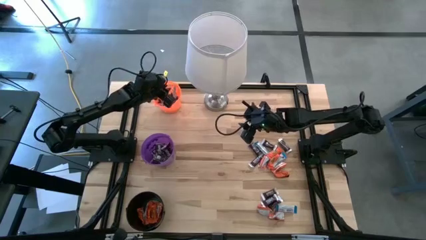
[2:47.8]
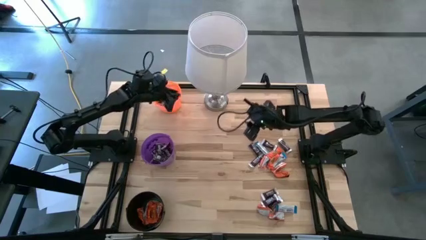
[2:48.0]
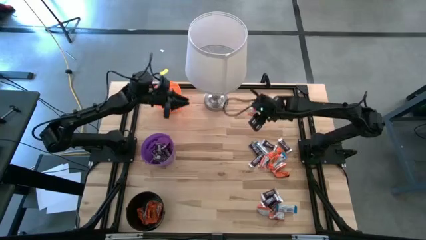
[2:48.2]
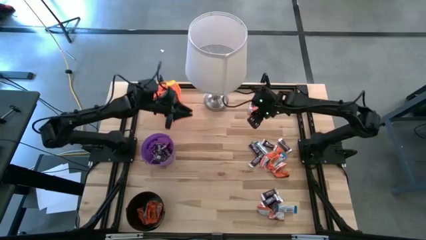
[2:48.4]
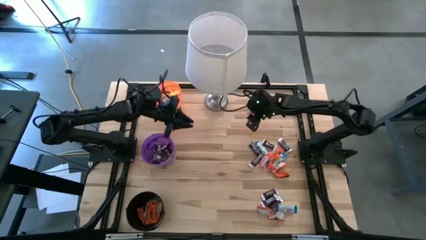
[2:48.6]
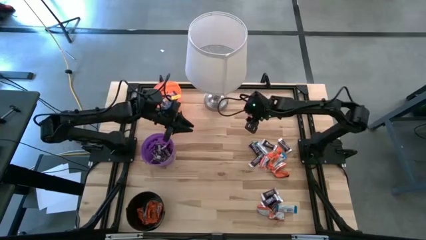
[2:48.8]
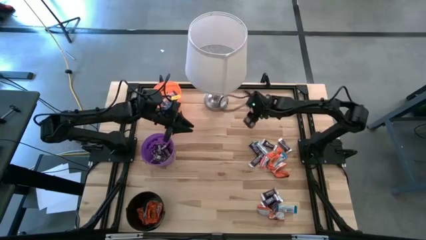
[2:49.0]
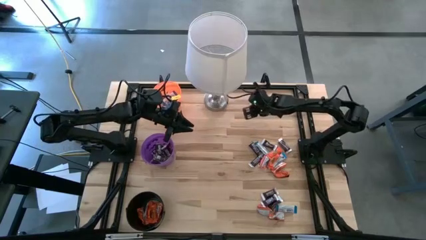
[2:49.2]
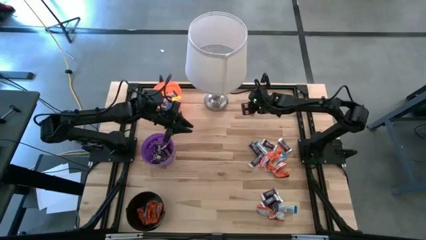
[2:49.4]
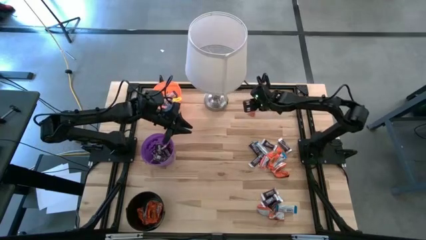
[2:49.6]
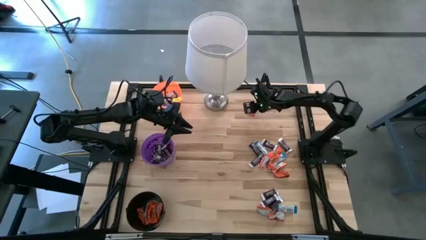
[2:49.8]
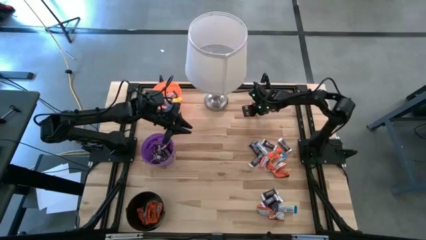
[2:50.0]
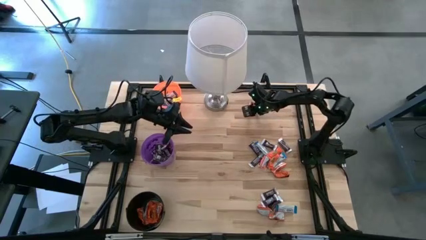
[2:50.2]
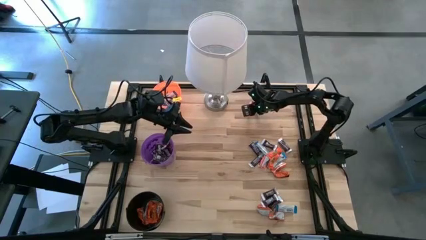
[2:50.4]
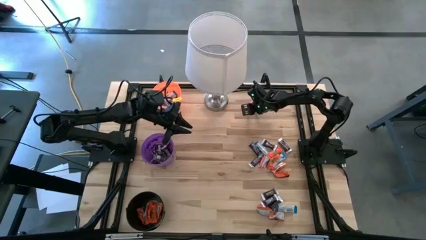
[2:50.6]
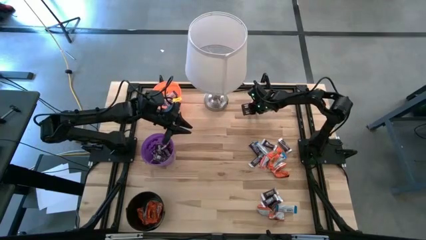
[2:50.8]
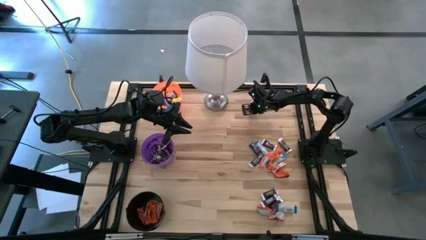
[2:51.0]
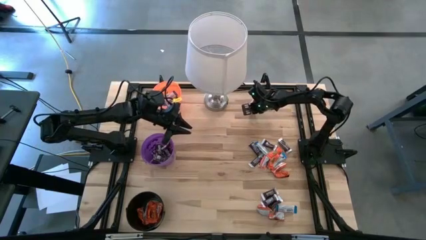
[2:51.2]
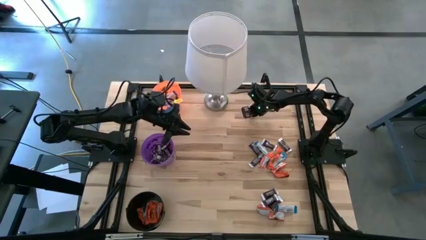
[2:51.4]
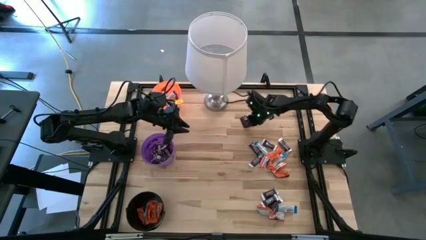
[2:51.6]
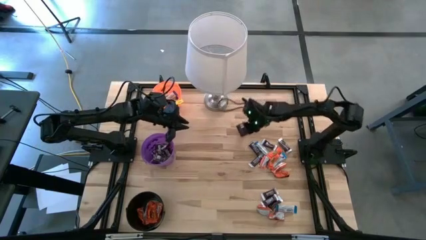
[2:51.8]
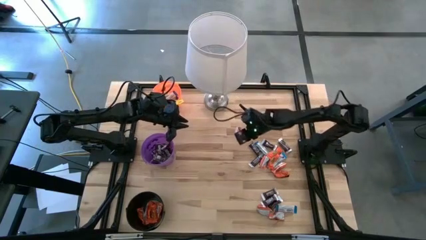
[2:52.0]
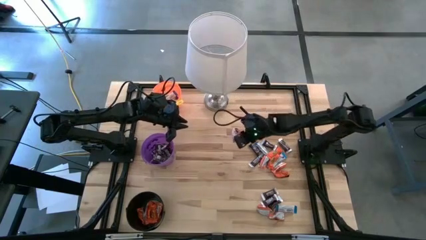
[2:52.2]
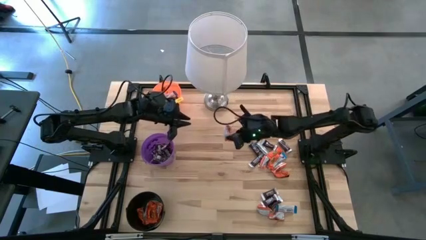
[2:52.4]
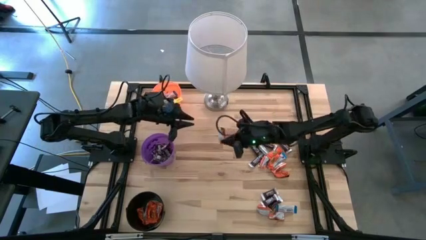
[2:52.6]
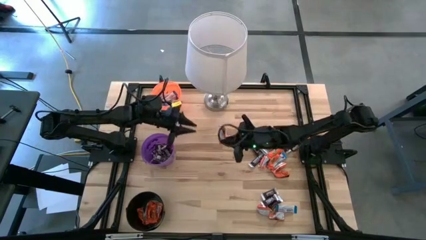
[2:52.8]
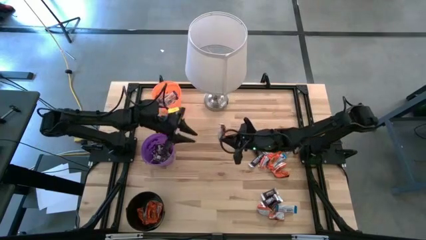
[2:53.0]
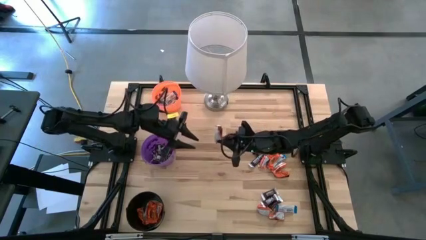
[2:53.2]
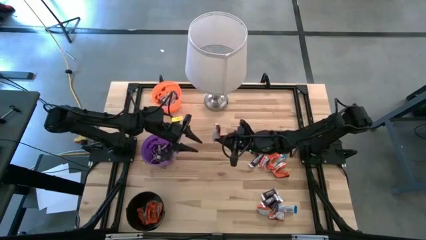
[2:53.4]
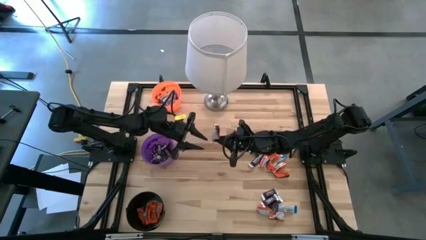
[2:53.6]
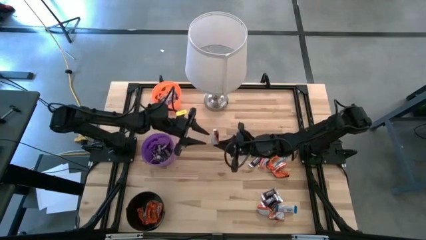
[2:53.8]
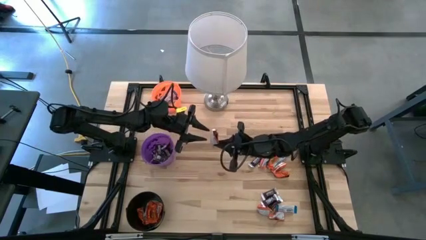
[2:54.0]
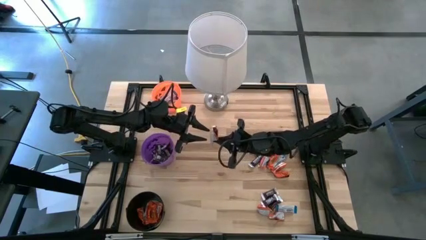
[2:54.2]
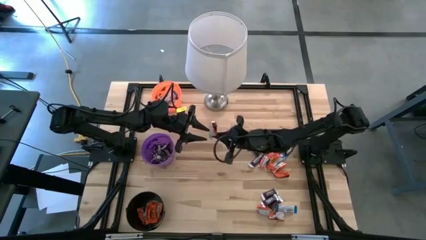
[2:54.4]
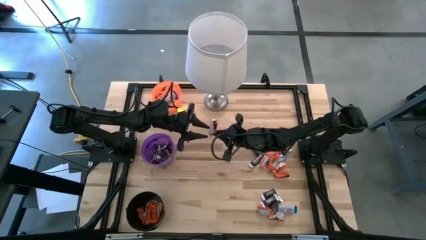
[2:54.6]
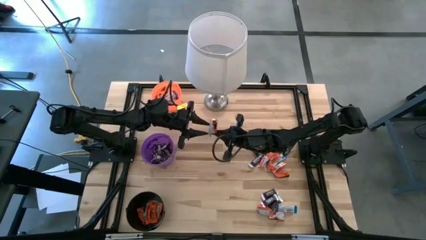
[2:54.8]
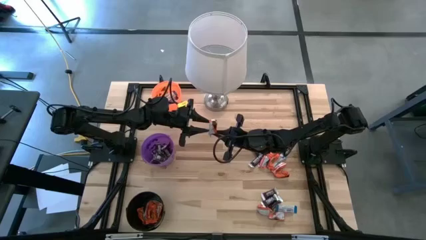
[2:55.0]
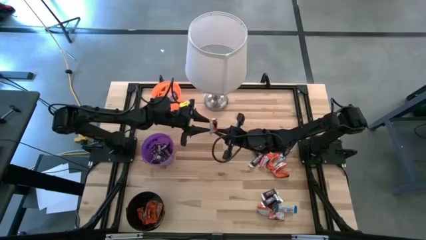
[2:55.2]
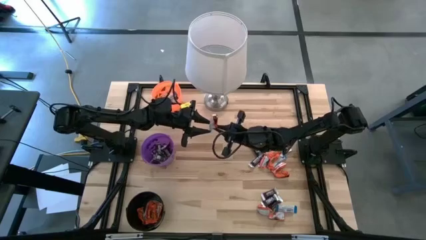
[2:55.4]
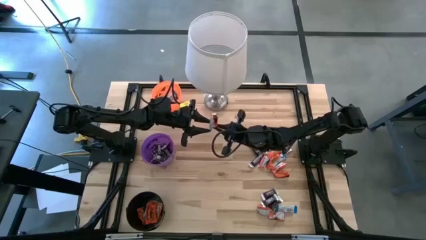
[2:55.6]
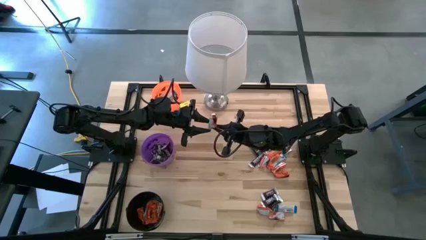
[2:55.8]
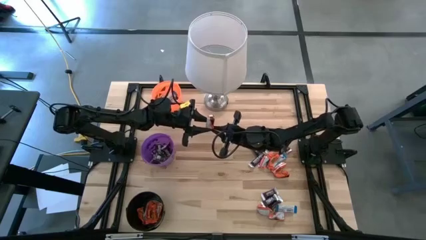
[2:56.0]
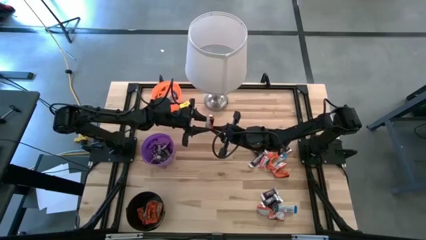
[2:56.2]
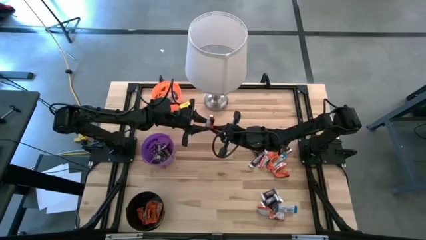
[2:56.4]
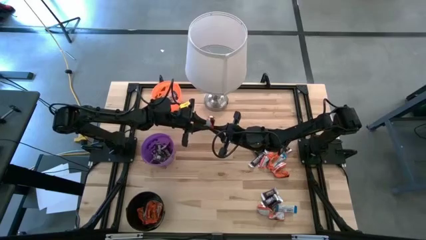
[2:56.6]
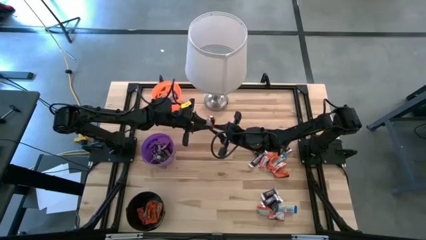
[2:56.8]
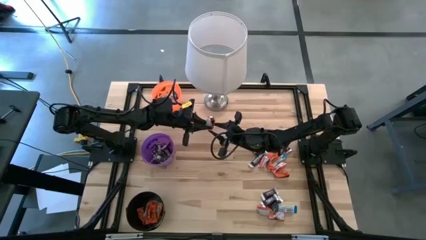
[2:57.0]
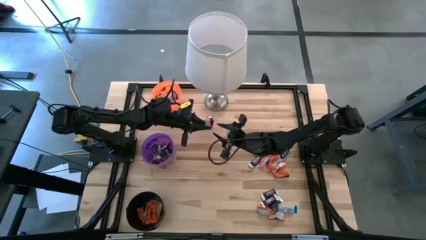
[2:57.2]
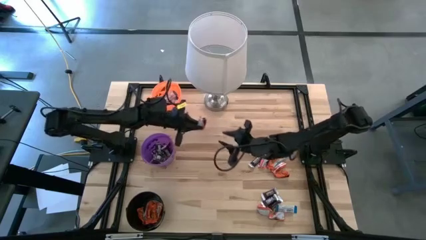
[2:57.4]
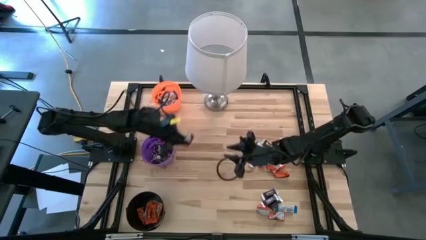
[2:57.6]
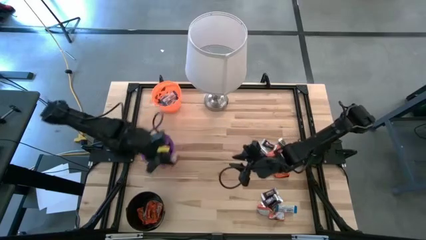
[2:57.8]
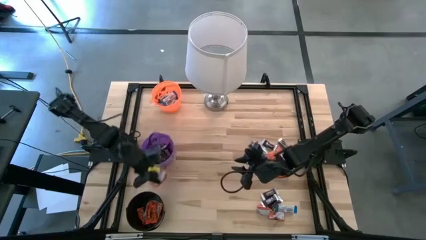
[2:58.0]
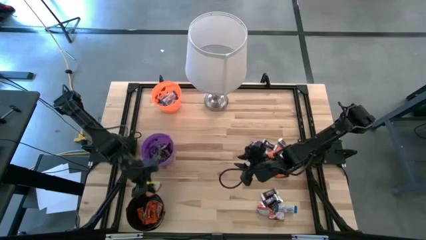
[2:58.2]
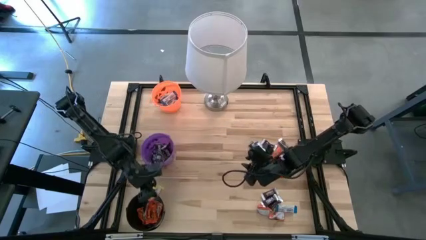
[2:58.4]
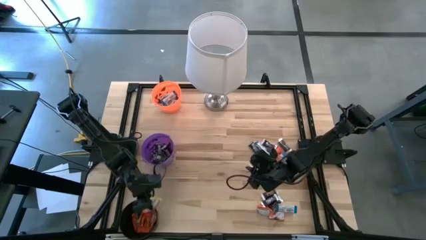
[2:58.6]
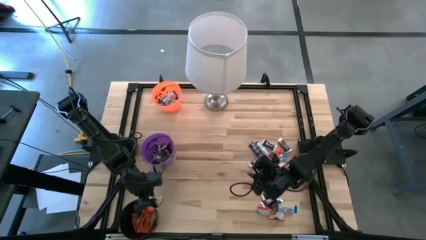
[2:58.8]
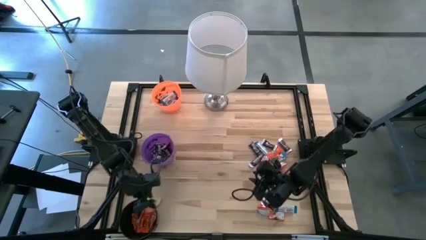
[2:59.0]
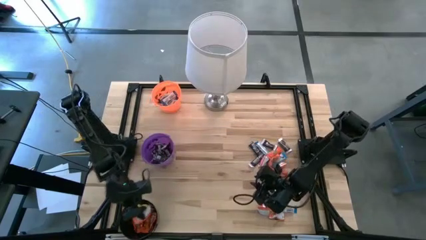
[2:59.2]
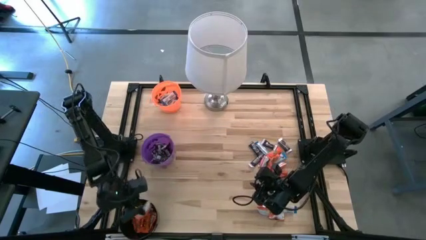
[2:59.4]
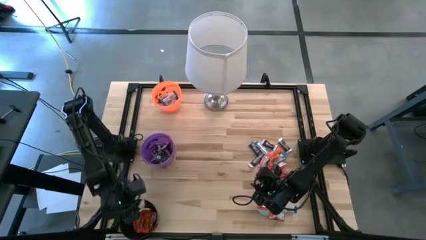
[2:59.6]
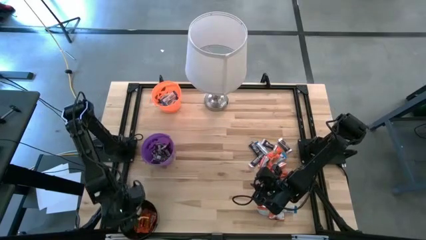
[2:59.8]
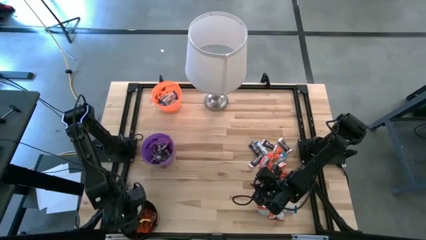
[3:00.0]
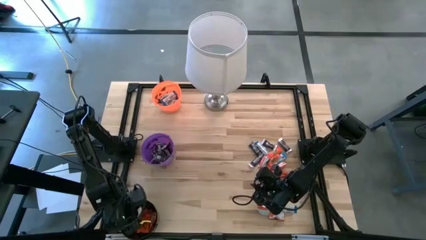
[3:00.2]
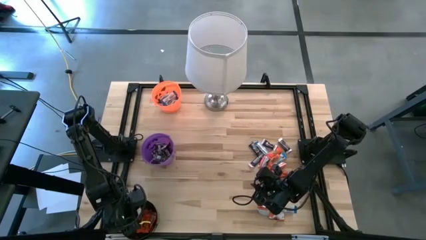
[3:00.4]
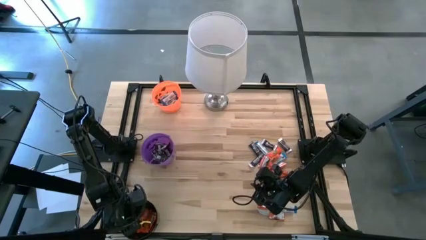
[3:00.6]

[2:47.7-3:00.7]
Task: Sort candy
Put the orange chocolate into the black bucket

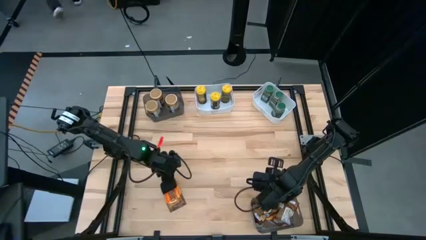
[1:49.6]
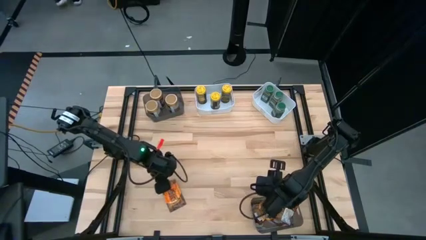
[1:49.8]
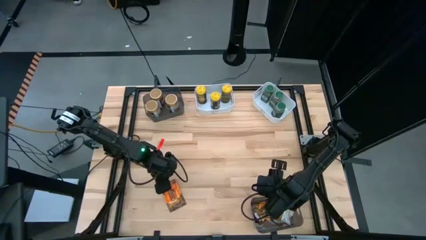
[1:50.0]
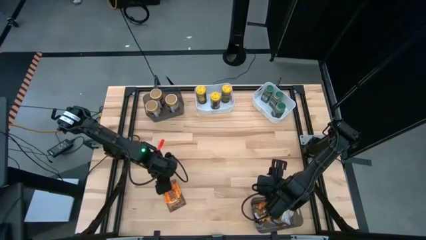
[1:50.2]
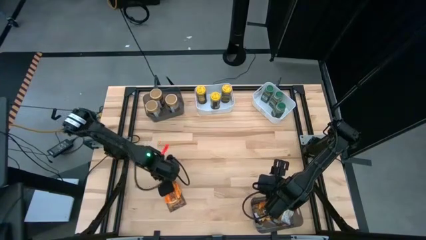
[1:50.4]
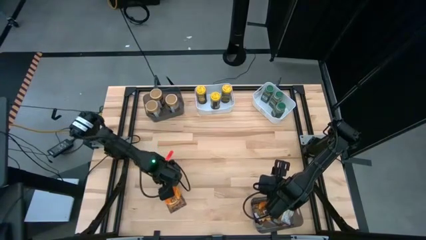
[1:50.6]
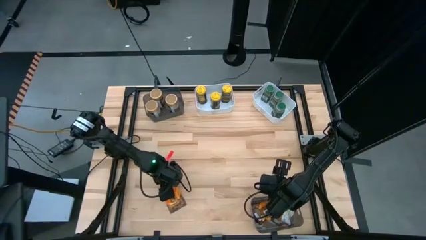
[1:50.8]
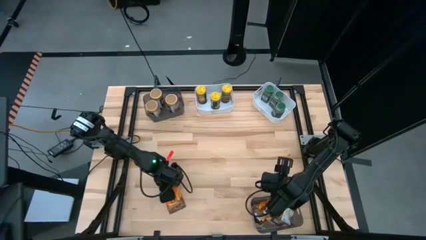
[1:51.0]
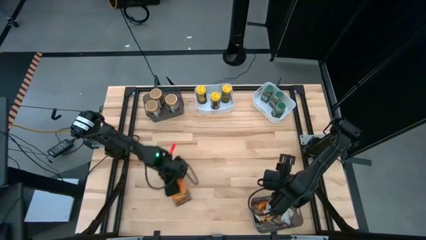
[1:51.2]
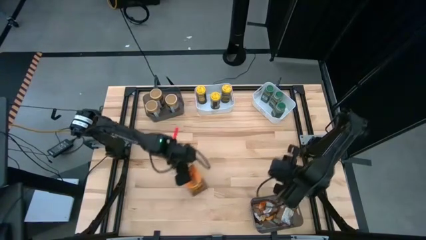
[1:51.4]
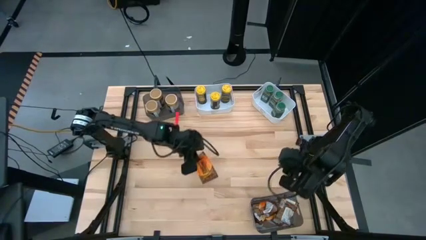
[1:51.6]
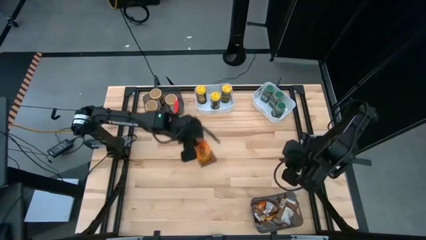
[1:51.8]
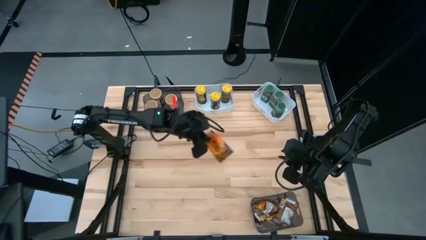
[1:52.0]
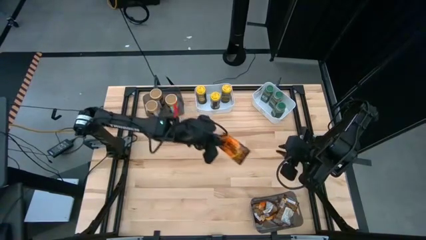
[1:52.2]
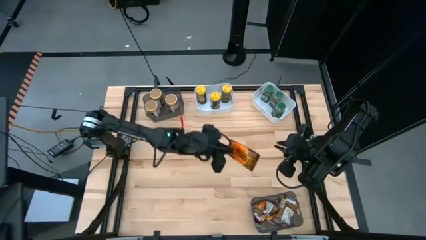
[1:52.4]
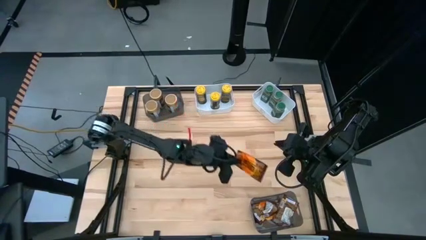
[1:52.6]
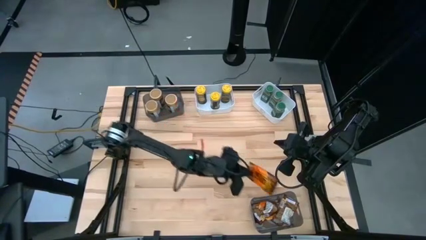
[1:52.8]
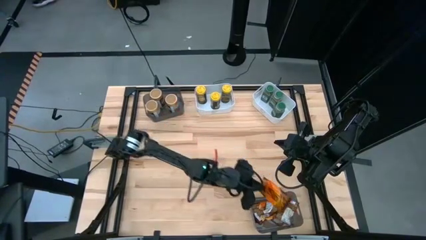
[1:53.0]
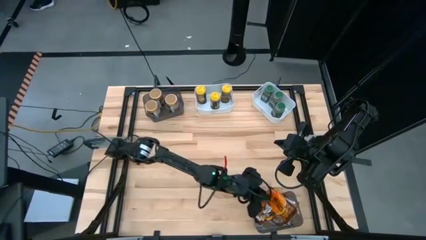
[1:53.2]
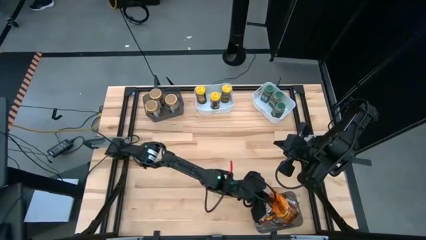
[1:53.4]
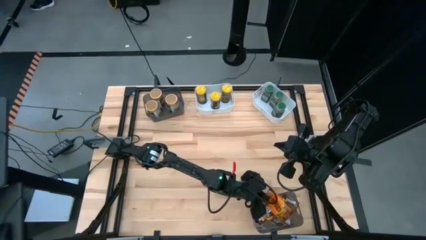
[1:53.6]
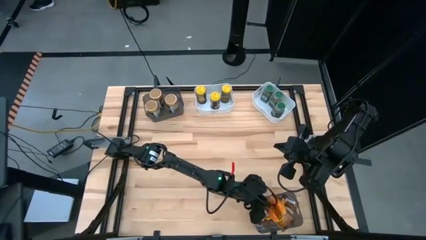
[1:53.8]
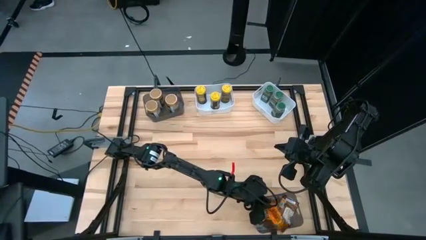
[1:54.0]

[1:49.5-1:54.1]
Task: Sort spices by type
Put the orange seasoning pack into the bottom black bin
